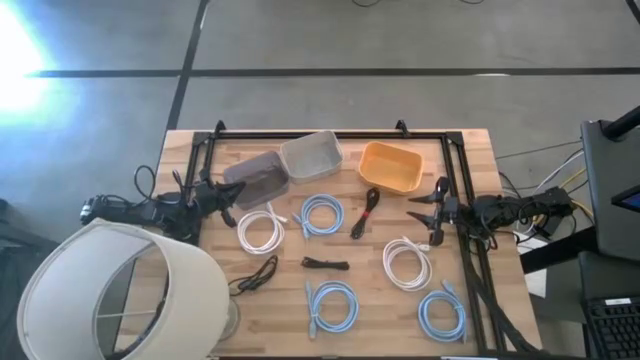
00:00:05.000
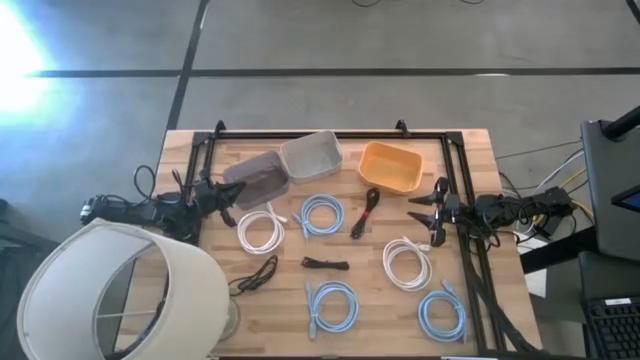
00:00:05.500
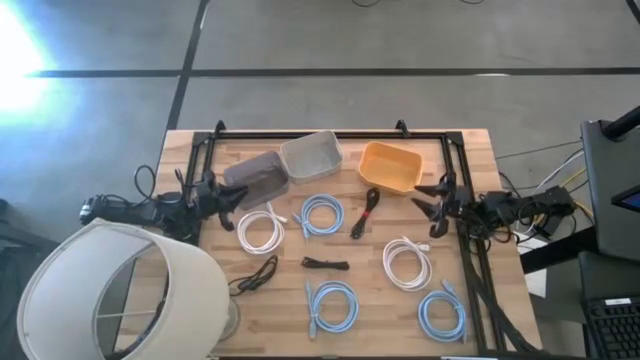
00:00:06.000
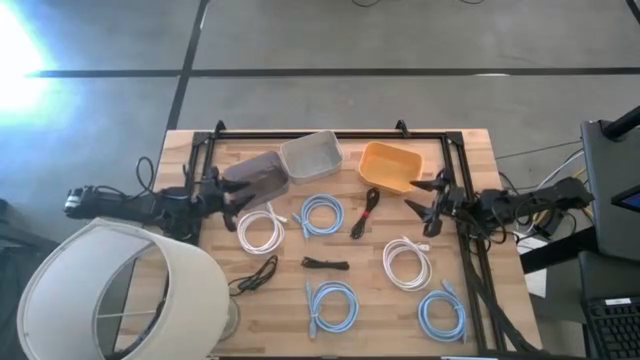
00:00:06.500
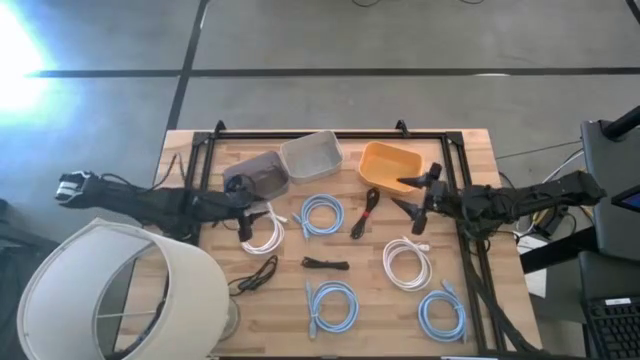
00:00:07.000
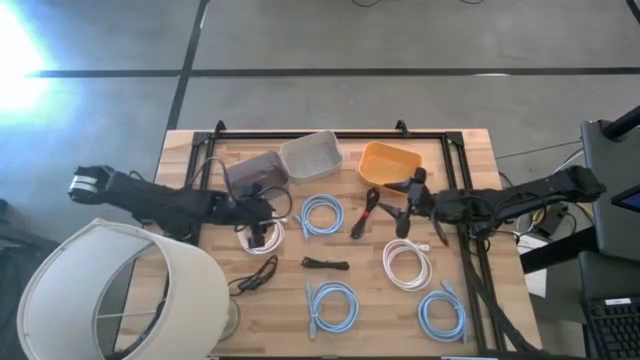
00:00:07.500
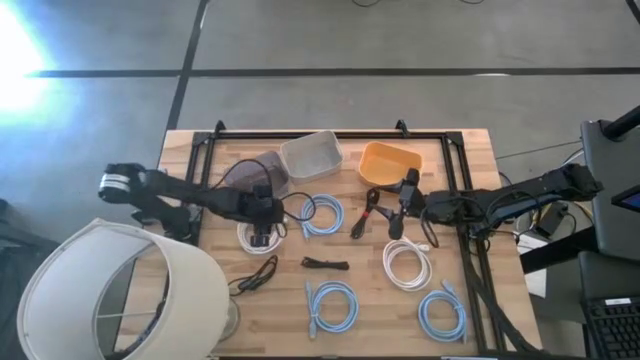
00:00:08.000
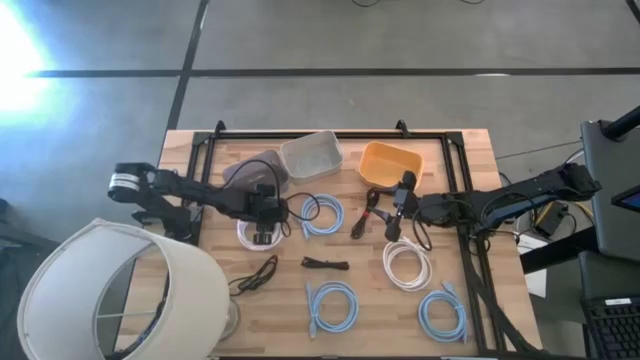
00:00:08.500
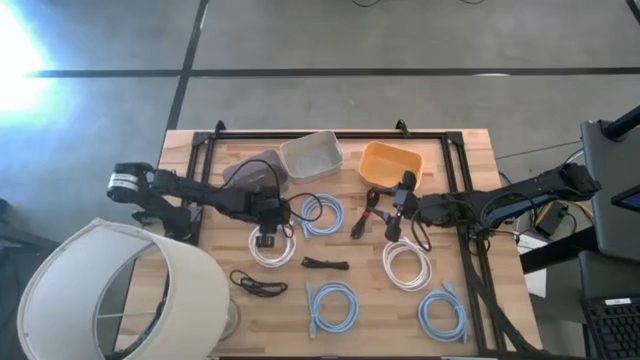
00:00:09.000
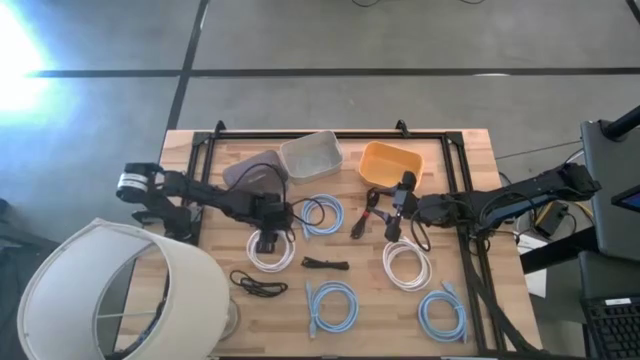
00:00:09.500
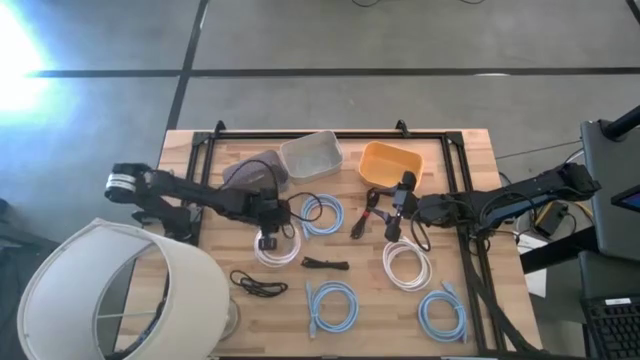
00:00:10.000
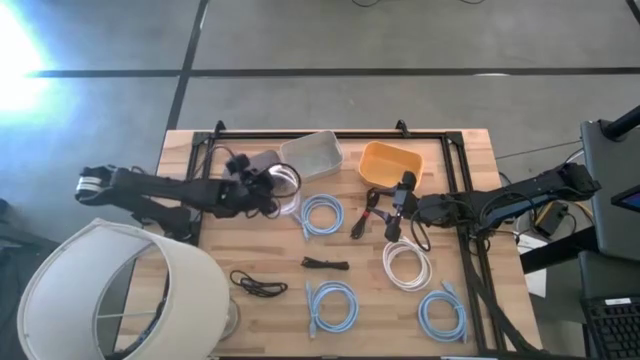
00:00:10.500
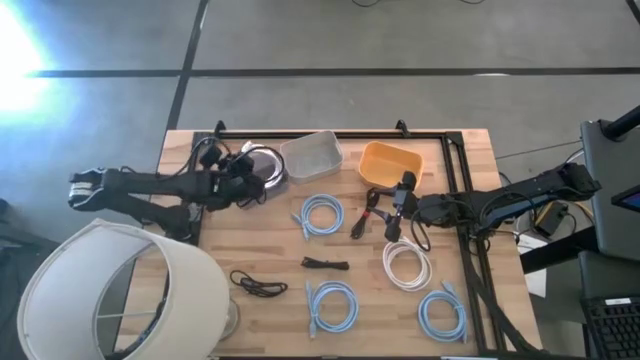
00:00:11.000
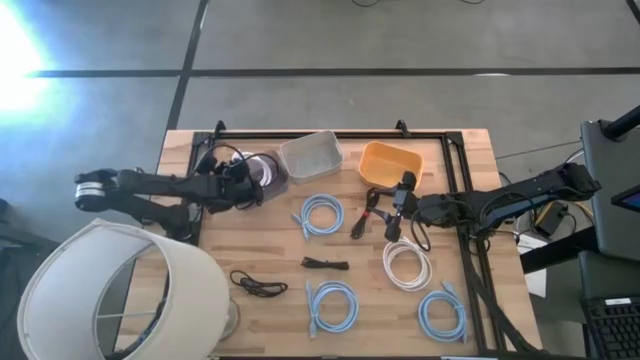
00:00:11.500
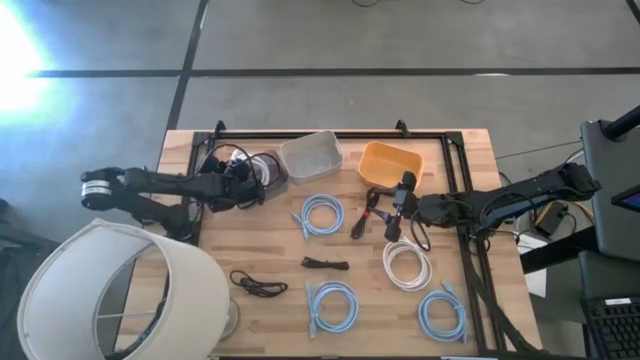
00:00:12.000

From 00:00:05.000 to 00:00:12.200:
Task: Pick & Place USB Port
Put the left white HDMI cable into the black bin

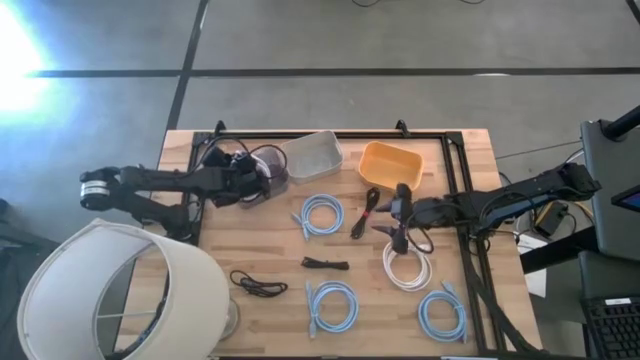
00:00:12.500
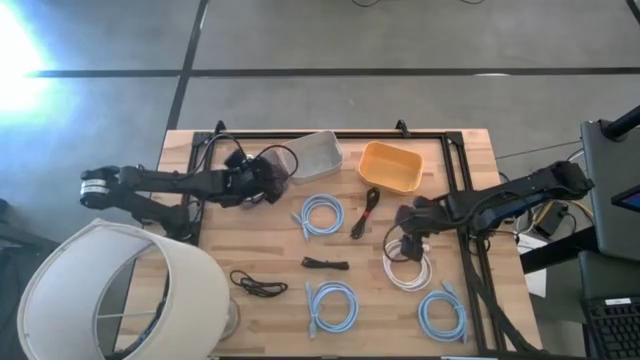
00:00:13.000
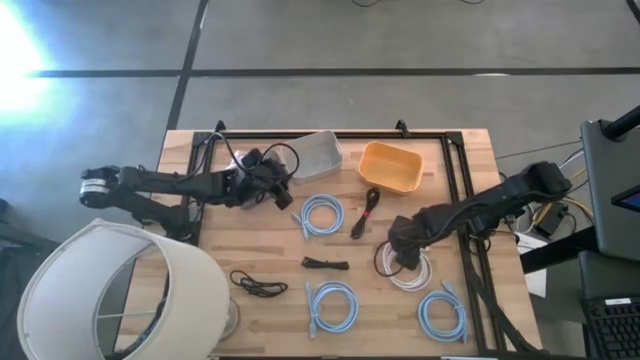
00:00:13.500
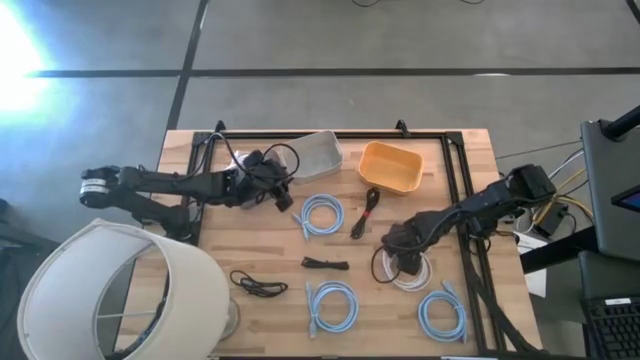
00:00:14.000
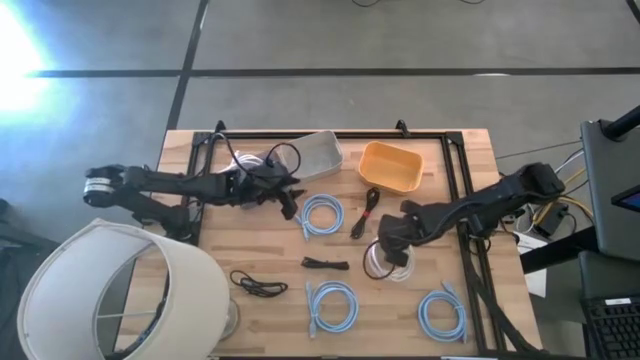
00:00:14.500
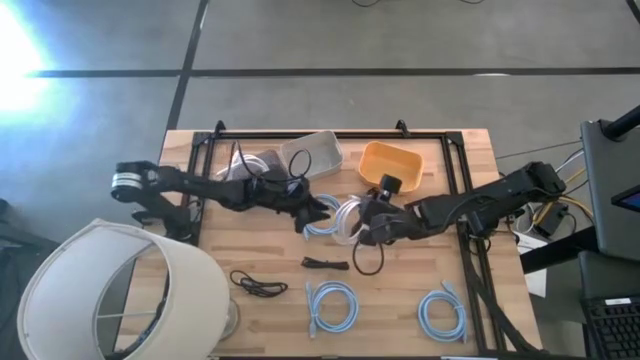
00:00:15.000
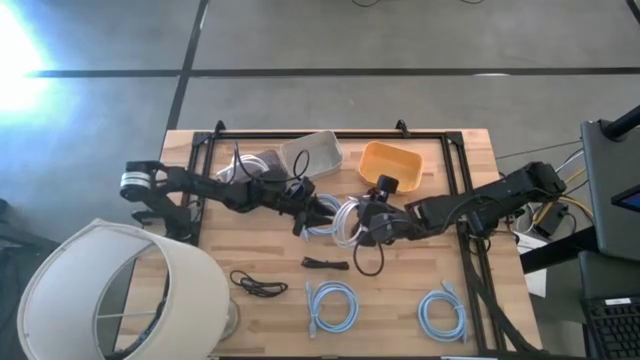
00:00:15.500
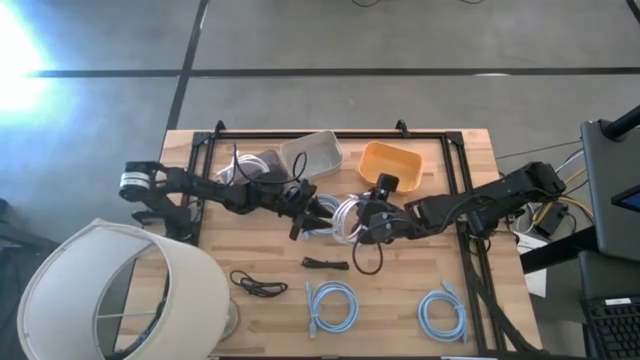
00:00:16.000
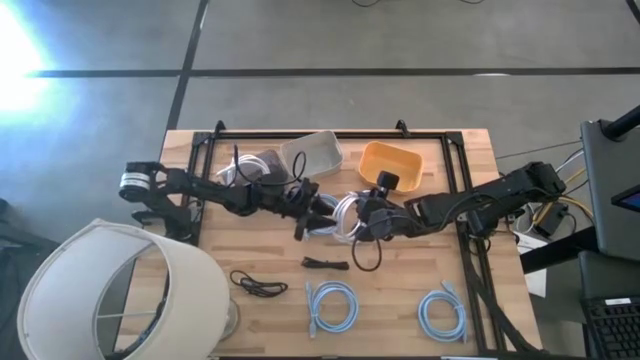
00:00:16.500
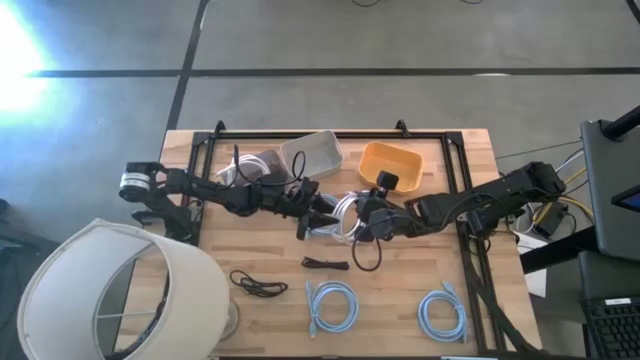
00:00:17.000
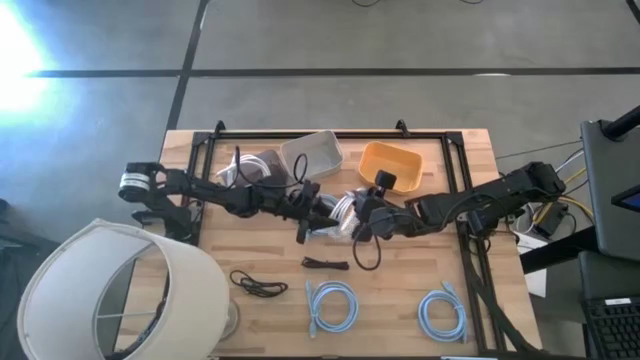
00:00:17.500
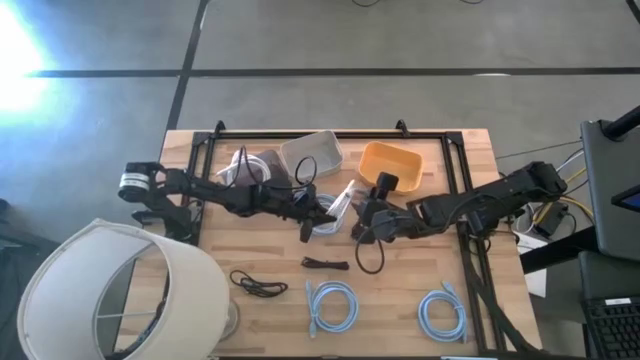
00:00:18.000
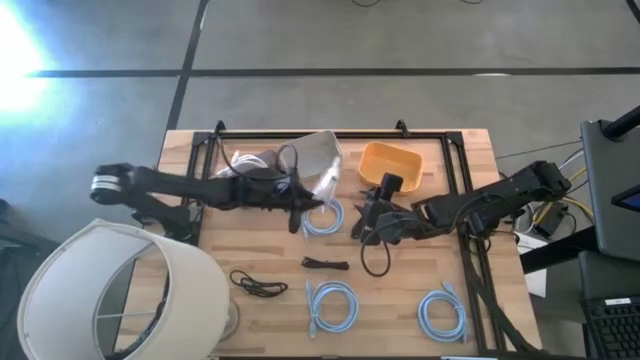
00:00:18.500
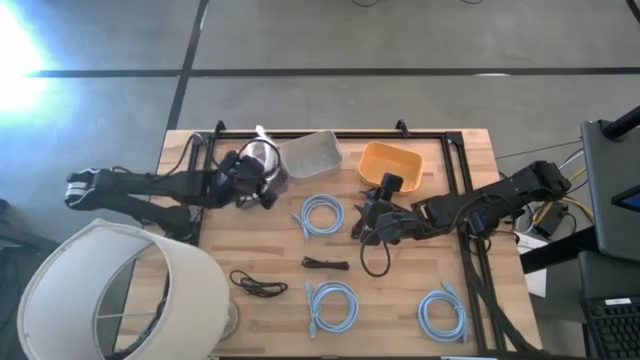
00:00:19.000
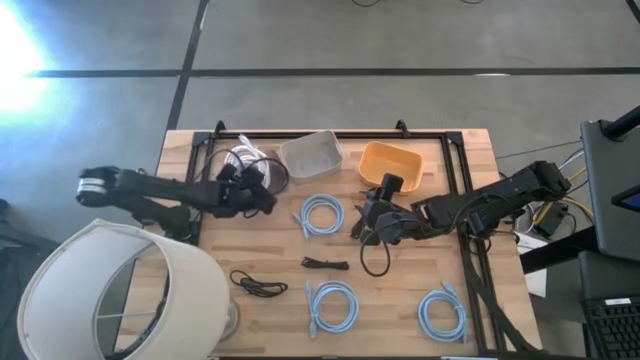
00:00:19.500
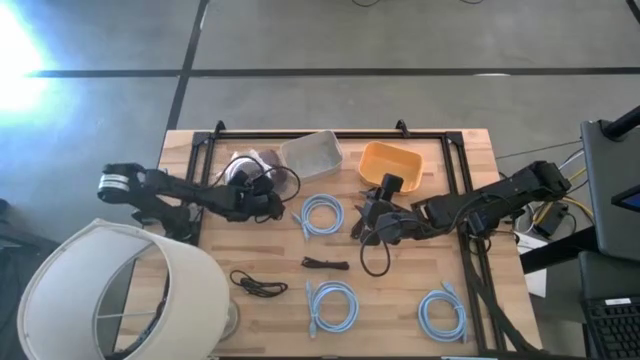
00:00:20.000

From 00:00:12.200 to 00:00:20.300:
Put the white HDMI cable into the black bin

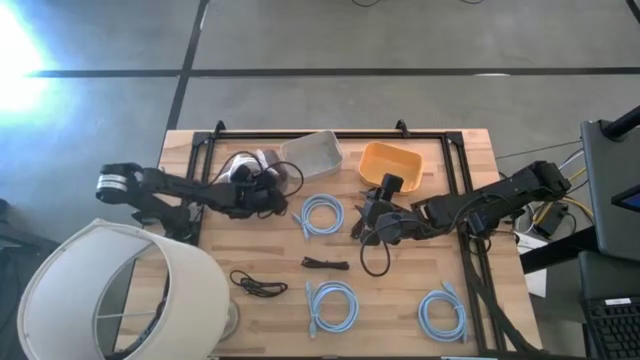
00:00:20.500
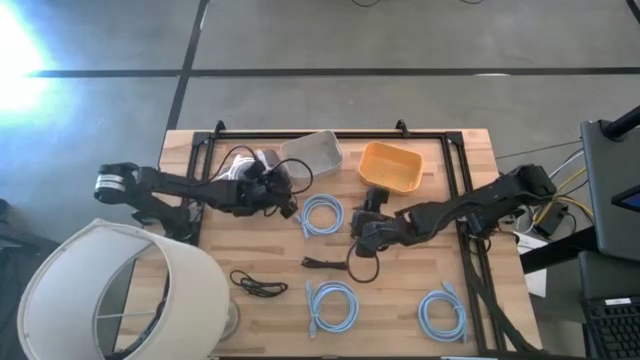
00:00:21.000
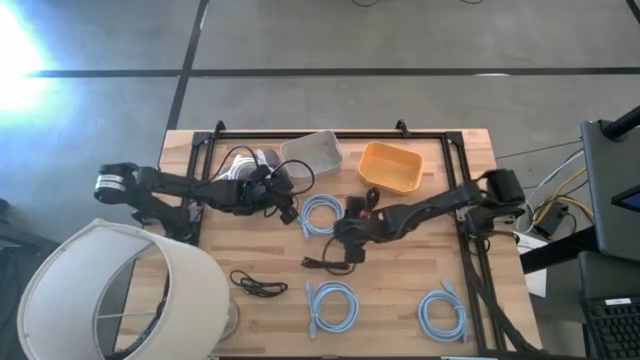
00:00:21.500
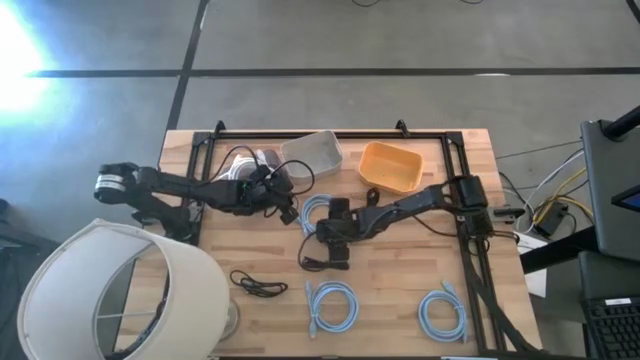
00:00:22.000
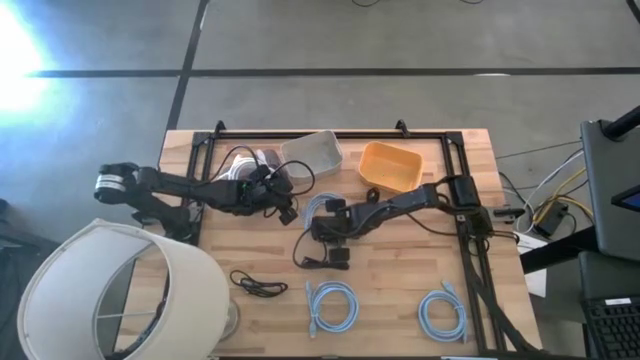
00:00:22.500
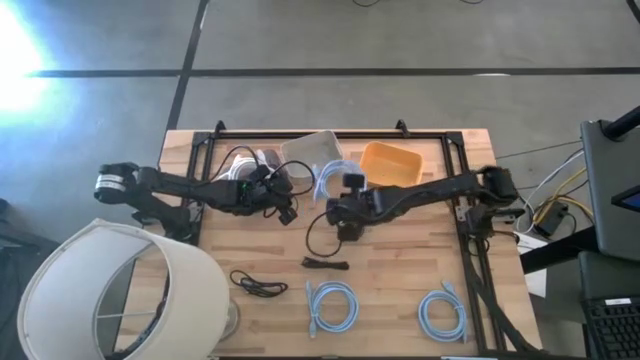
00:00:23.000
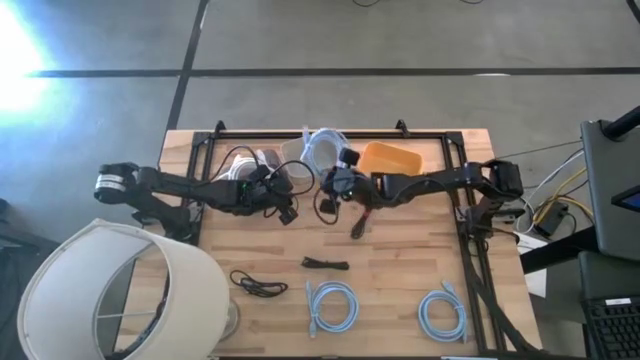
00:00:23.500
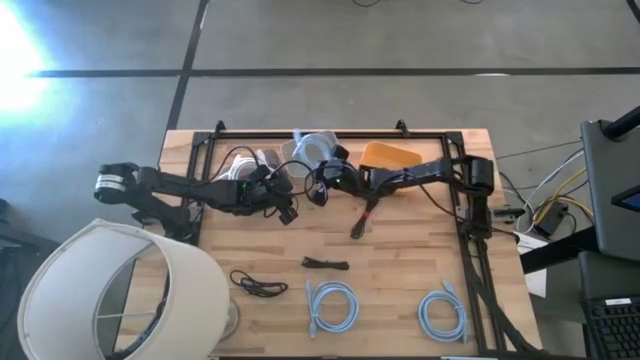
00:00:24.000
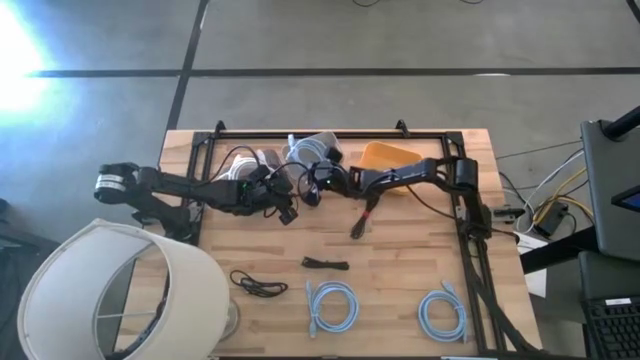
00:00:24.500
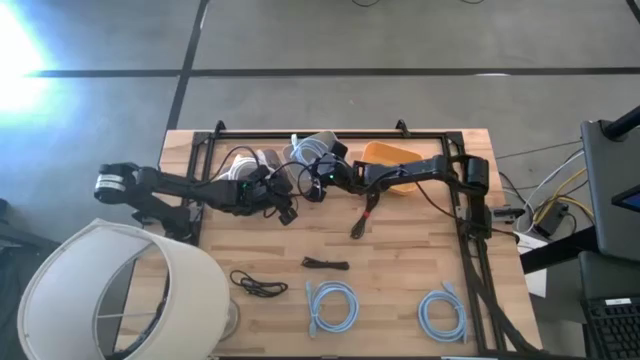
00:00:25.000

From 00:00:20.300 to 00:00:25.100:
Put the top blue HDMI cable into the gray bin
